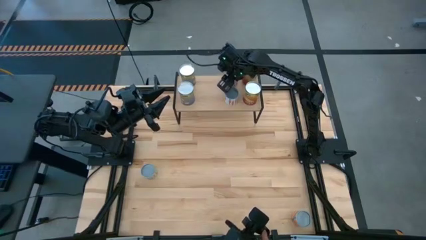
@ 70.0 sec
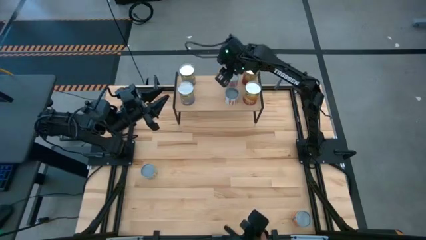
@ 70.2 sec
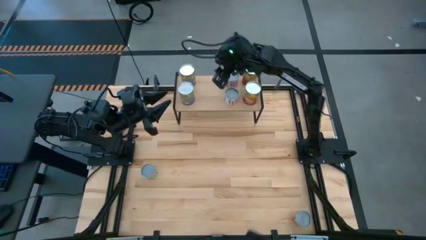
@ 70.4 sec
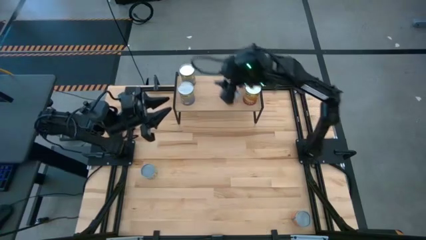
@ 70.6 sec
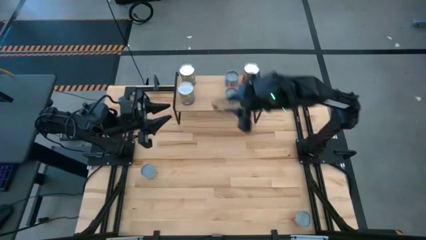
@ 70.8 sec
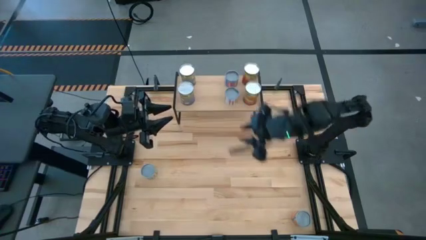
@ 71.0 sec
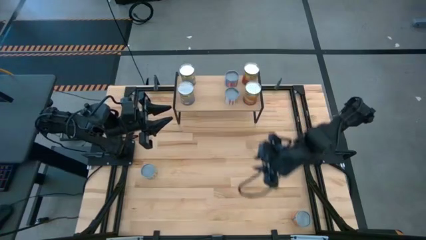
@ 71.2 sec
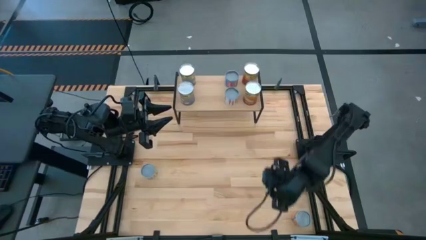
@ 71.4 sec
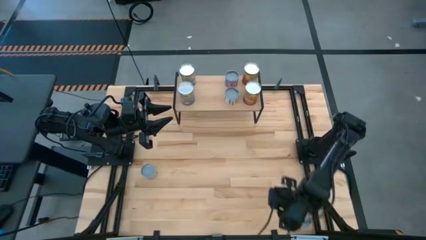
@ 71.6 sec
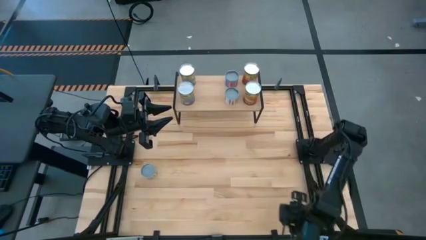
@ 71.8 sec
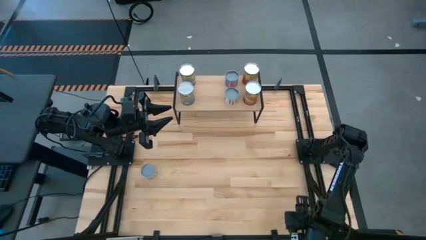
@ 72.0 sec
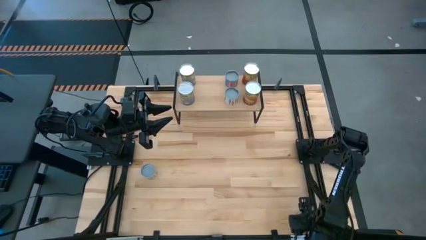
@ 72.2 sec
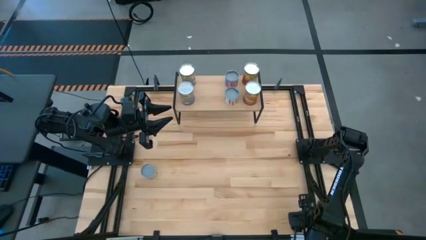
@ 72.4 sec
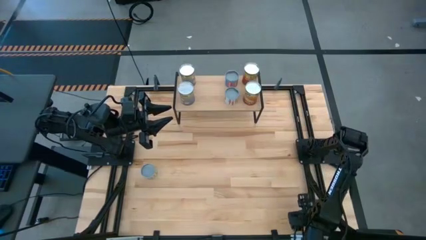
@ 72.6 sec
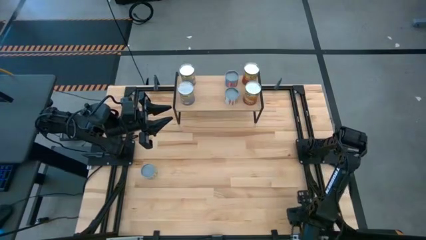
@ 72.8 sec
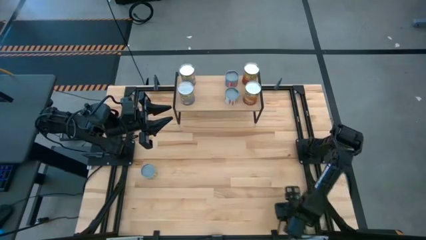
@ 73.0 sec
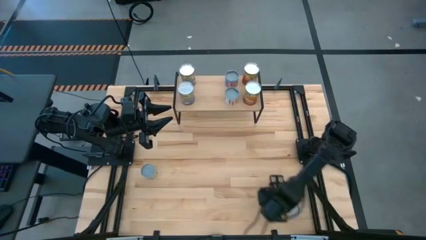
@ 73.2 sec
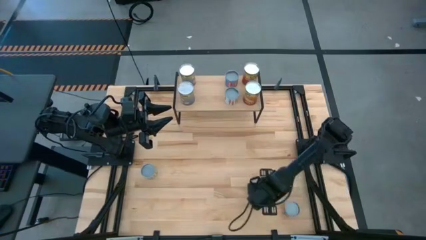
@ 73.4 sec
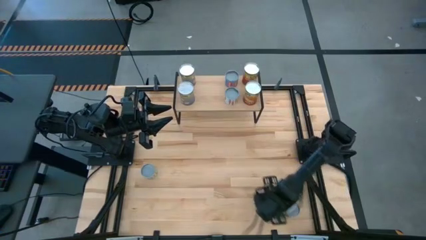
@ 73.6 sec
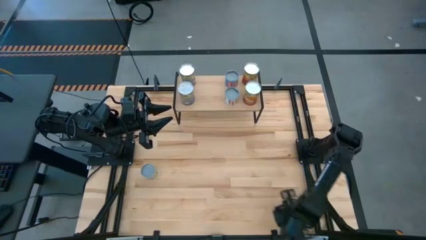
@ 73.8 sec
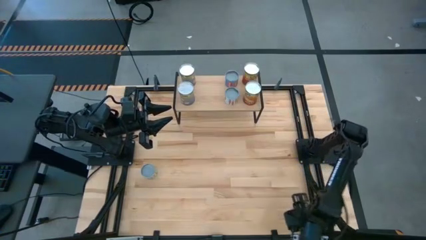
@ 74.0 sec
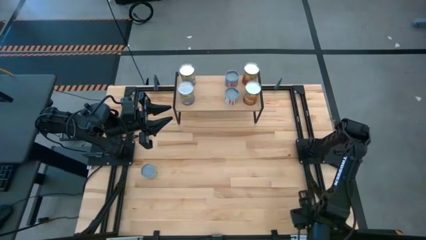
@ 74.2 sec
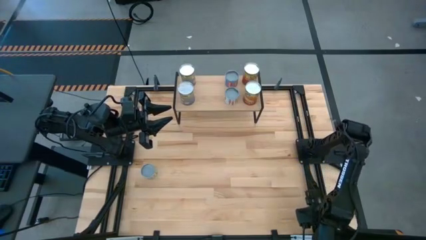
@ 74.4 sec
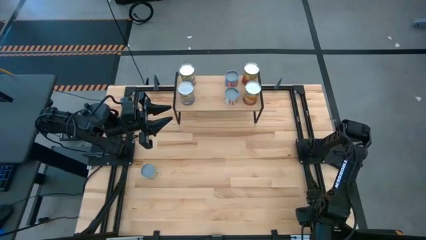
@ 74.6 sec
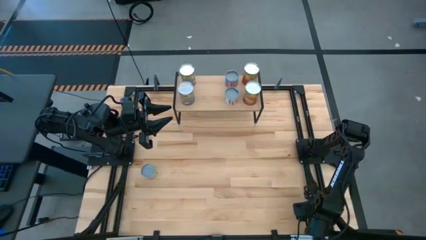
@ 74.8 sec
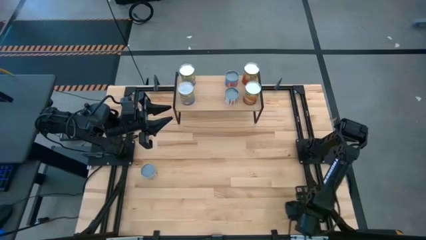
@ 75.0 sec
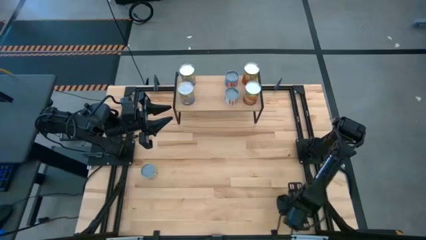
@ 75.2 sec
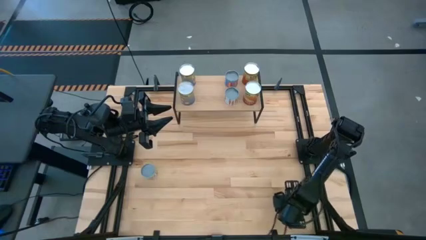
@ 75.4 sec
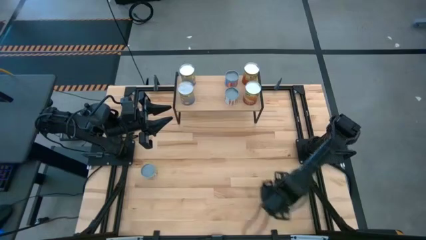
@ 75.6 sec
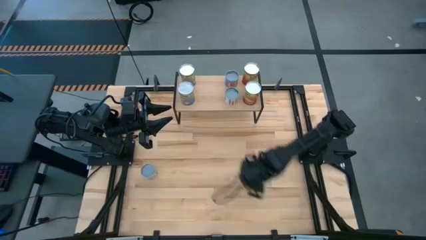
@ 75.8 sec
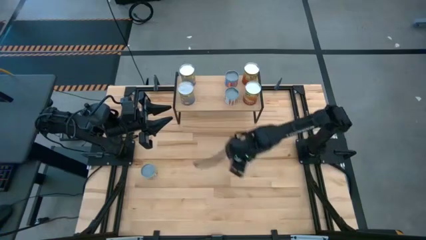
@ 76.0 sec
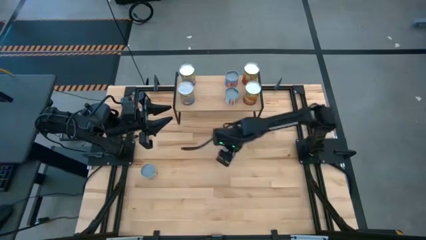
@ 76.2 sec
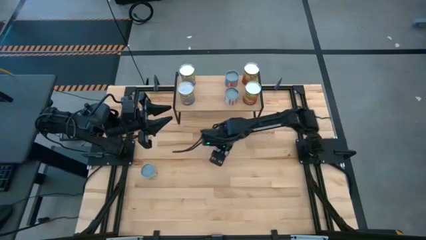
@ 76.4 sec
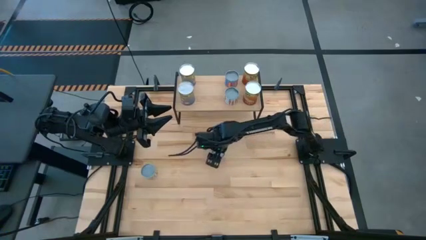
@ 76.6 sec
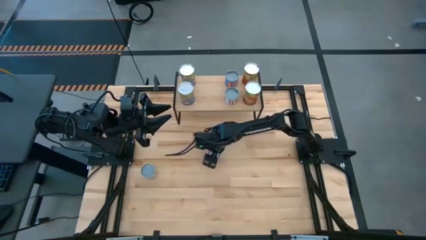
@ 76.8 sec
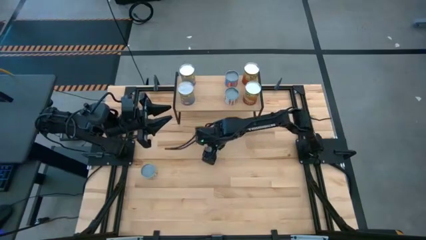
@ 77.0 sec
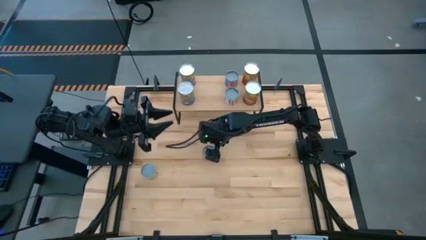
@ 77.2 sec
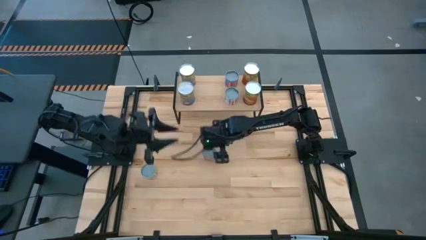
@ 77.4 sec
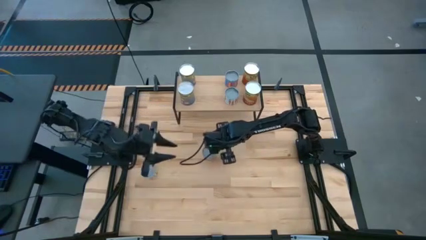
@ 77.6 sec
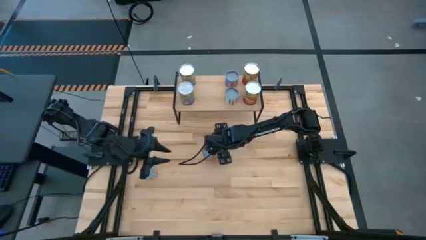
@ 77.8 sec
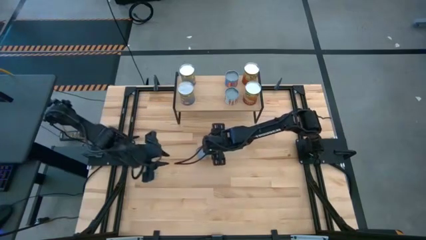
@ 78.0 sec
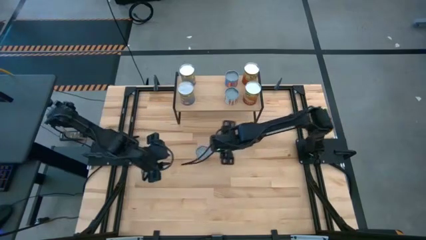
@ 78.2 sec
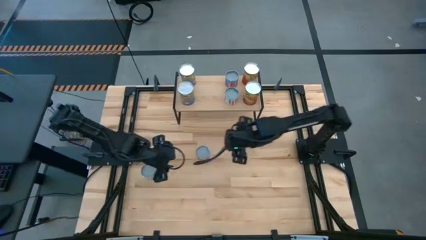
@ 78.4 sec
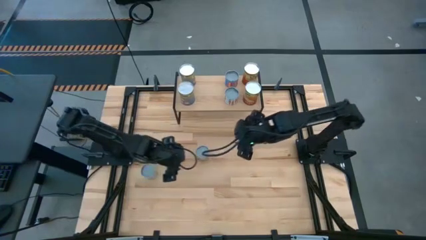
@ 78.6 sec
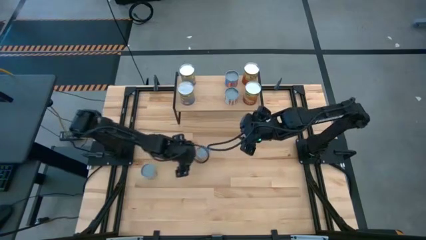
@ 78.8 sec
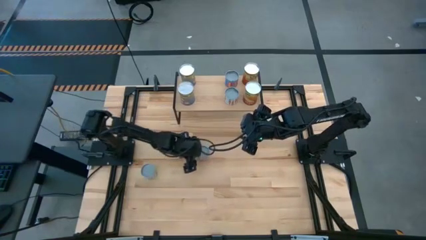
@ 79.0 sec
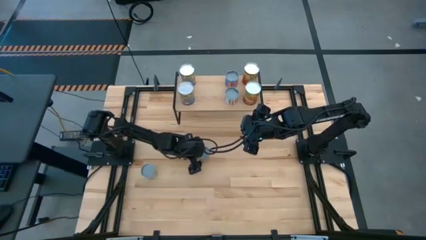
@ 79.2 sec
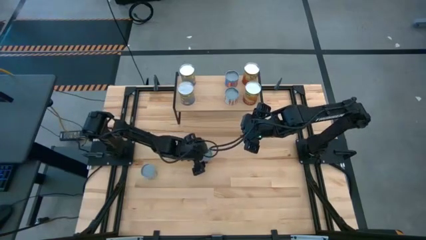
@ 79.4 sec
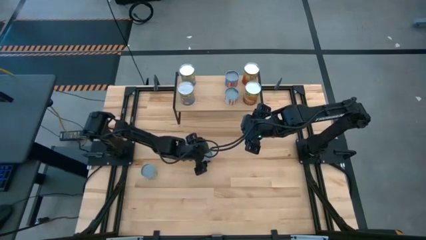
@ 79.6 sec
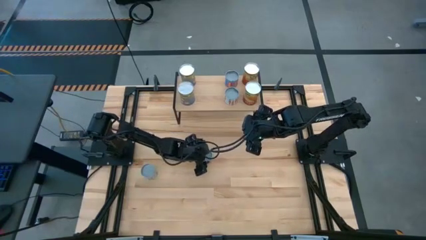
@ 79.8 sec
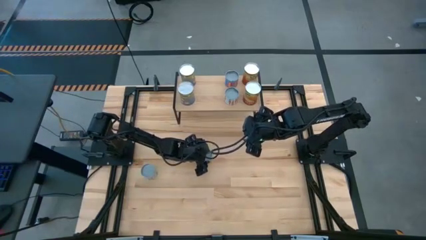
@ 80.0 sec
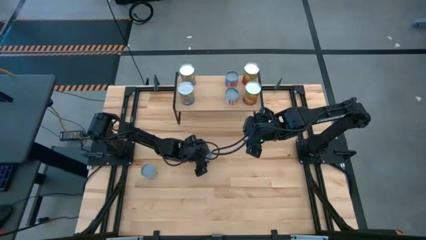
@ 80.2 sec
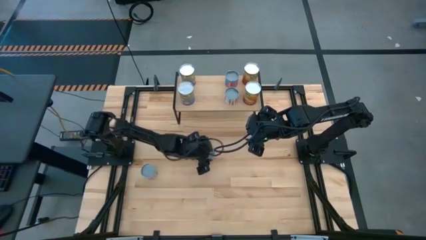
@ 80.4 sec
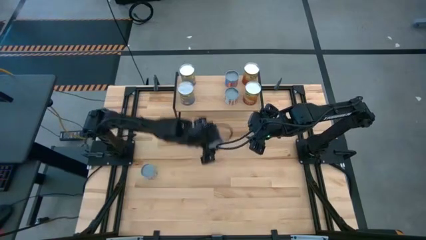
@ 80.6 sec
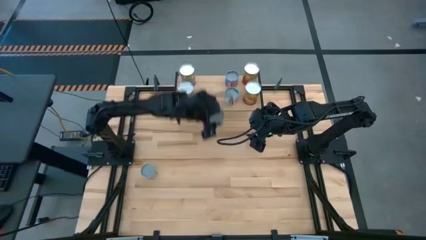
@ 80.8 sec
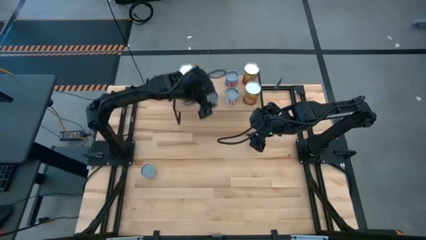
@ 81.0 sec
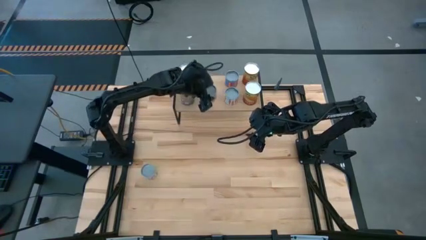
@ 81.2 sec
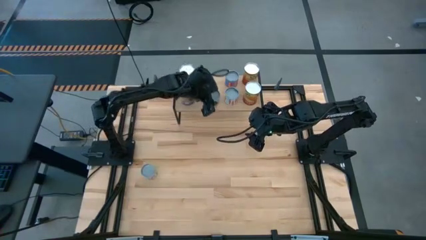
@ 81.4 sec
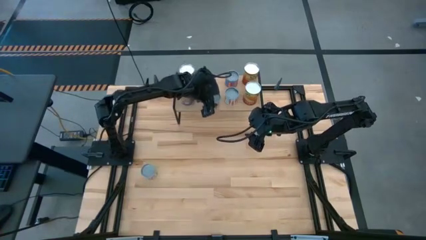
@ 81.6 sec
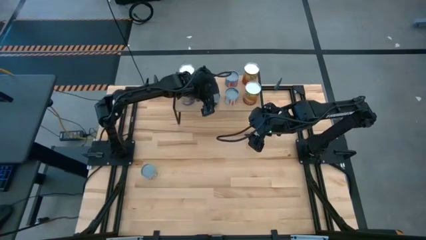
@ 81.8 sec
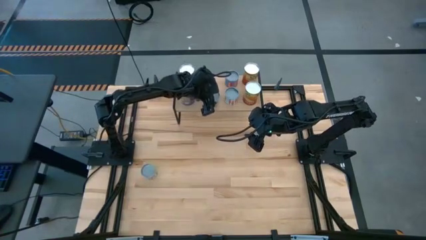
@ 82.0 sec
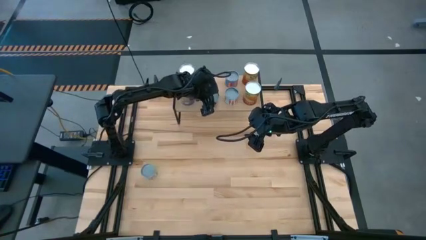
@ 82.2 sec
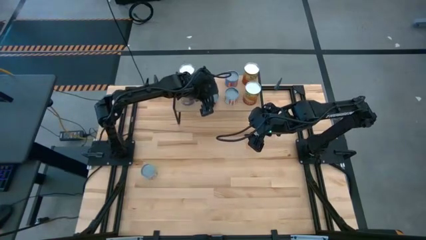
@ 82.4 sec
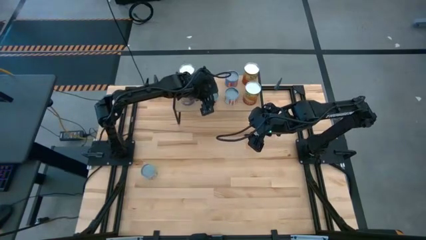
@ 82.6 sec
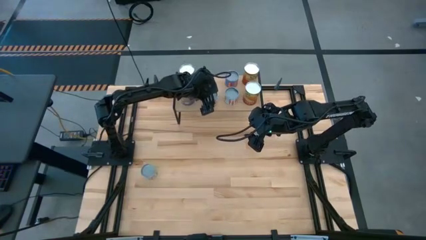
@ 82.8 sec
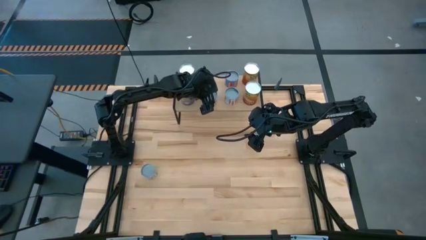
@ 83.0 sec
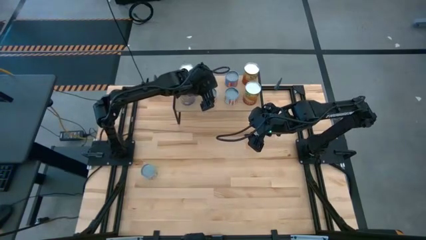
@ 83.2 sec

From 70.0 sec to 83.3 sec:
Task: Pick and place cans onto a shelf
Put the canned oranges on the shelf

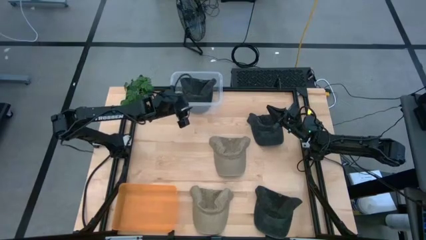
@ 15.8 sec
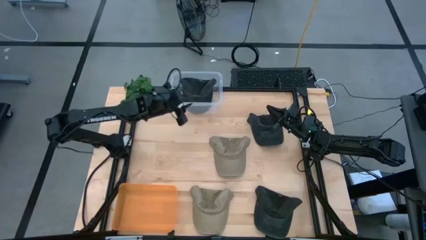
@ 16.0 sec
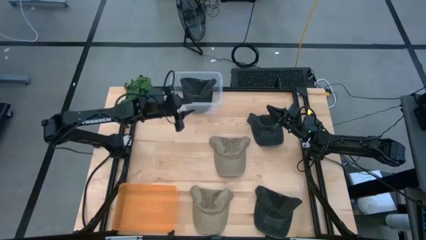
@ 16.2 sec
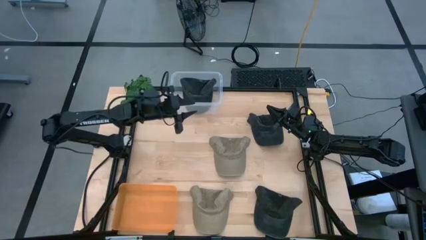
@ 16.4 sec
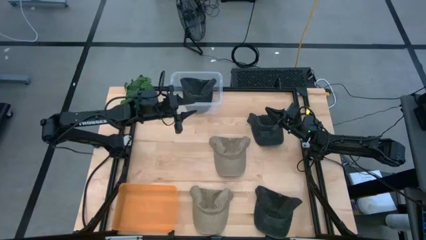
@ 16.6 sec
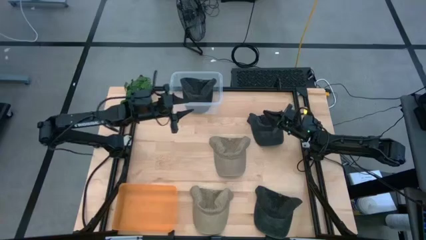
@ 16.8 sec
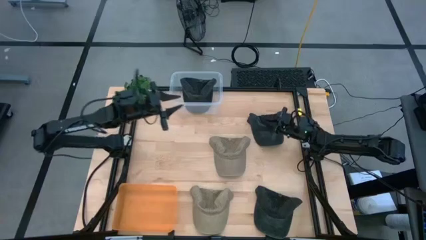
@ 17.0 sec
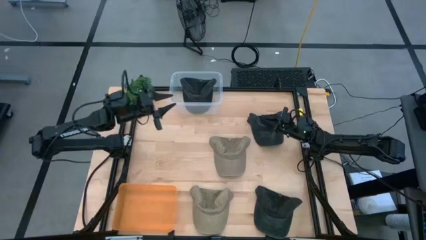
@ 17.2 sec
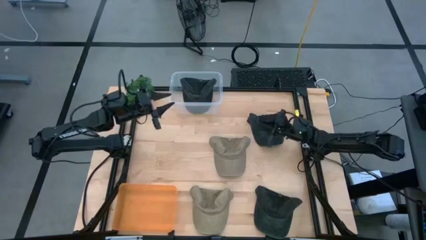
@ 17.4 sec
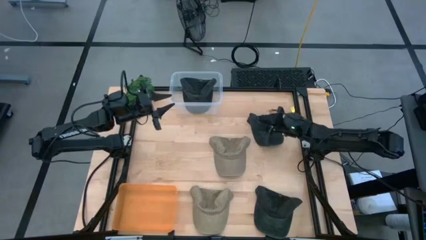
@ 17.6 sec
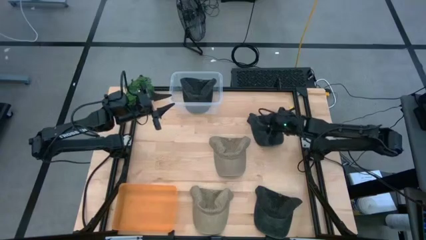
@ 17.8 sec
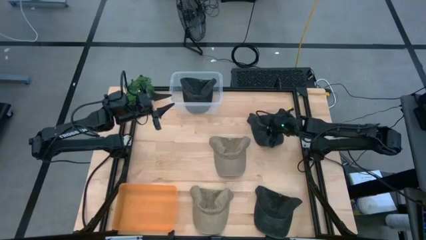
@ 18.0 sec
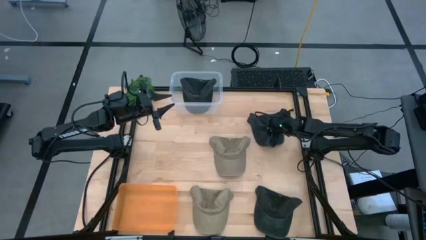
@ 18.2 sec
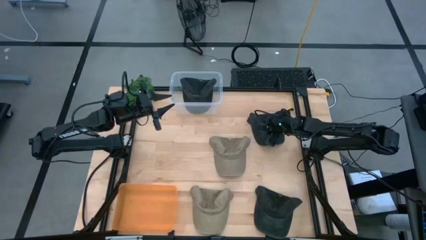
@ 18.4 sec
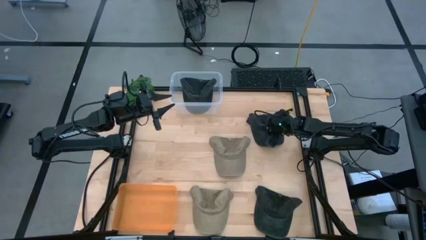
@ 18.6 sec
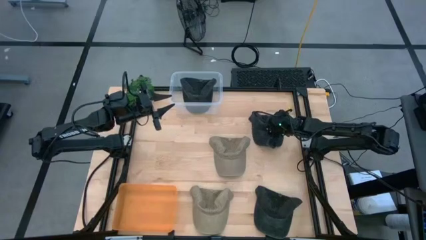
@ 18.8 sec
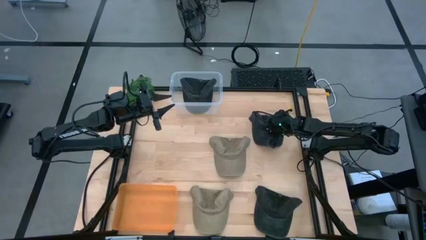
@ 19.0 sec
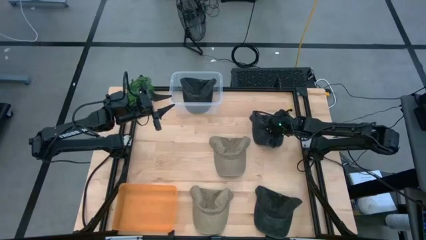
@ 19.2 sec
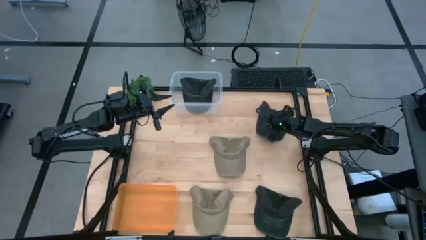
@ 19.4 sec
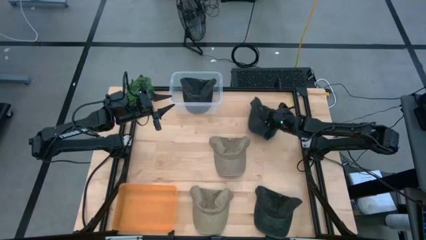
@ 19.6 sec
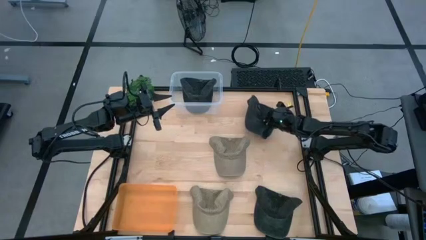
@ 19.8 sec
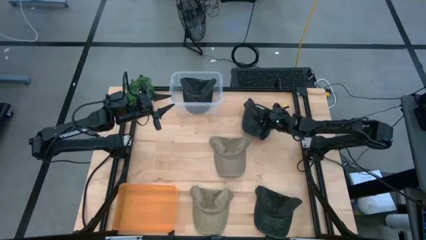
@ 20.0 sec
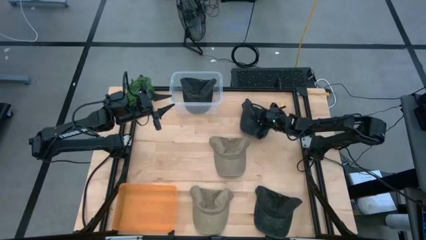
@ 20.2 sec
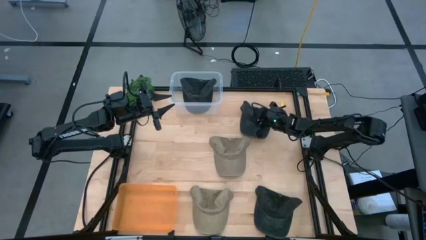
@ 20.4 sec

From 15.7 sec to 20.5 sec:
Task: Pick & Place hat
Adjust the top black cap
